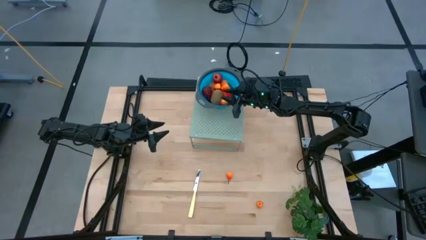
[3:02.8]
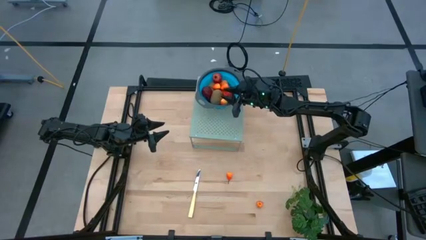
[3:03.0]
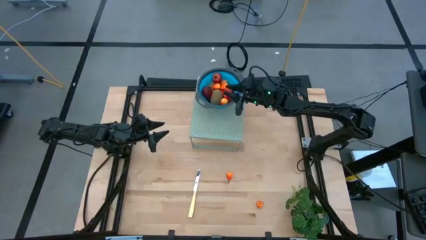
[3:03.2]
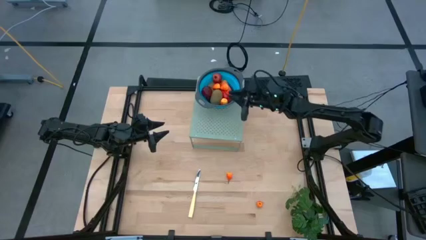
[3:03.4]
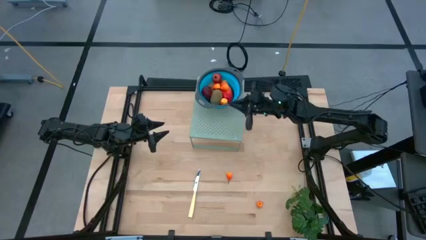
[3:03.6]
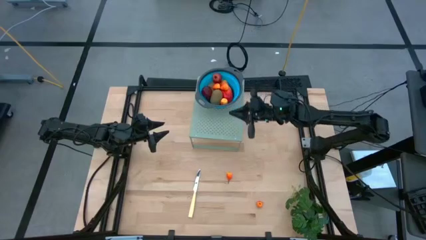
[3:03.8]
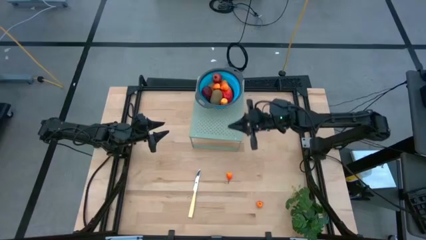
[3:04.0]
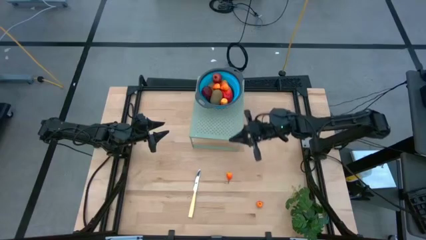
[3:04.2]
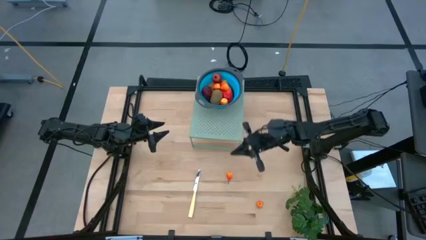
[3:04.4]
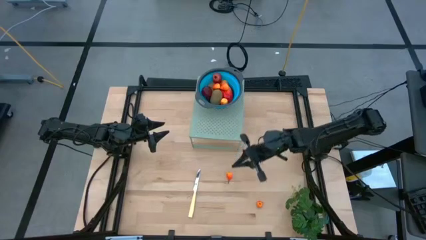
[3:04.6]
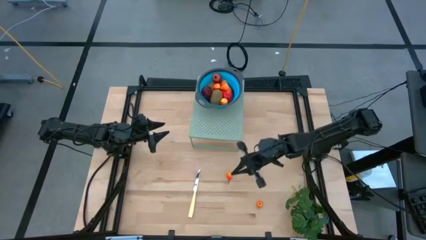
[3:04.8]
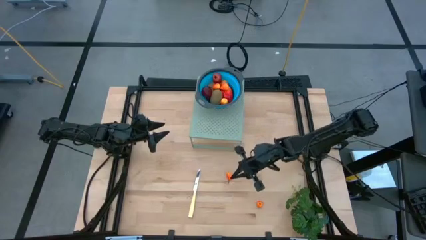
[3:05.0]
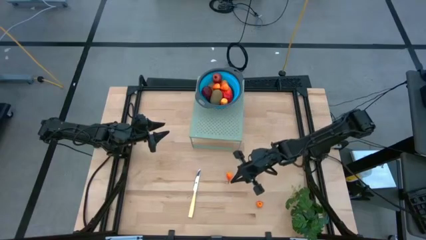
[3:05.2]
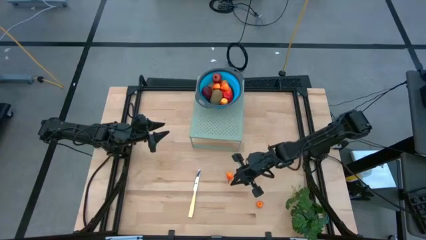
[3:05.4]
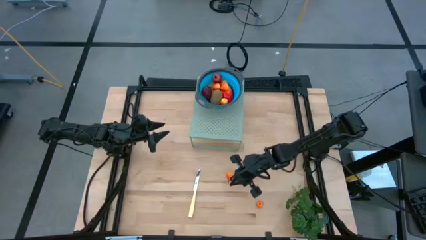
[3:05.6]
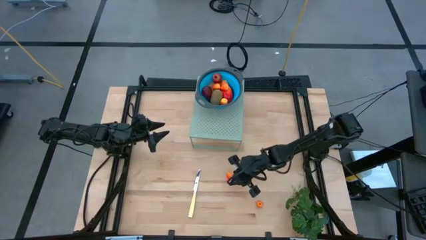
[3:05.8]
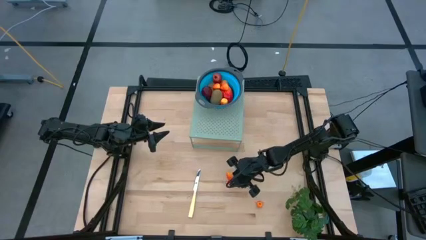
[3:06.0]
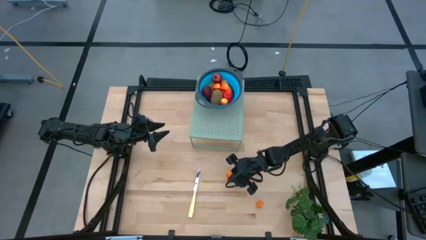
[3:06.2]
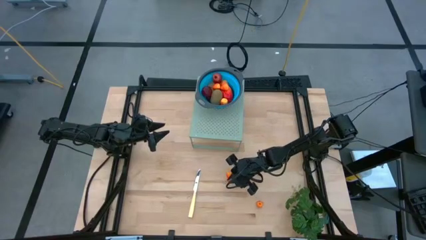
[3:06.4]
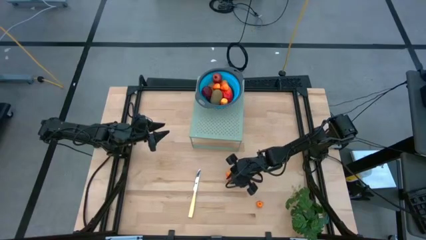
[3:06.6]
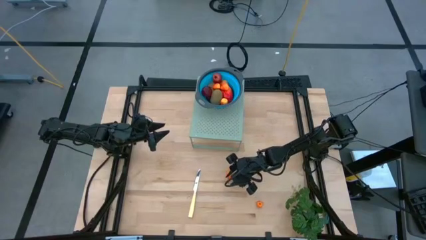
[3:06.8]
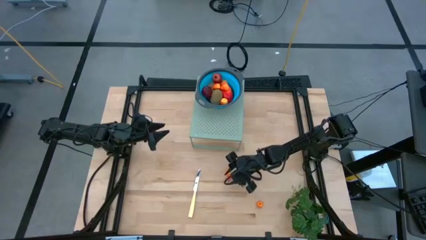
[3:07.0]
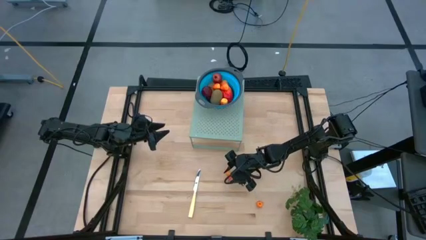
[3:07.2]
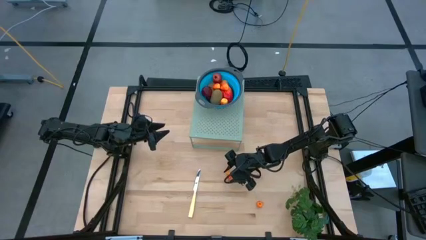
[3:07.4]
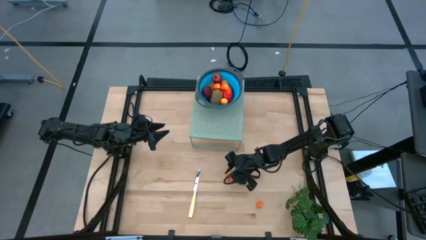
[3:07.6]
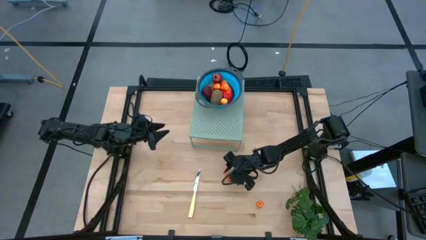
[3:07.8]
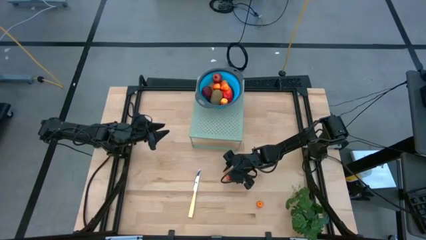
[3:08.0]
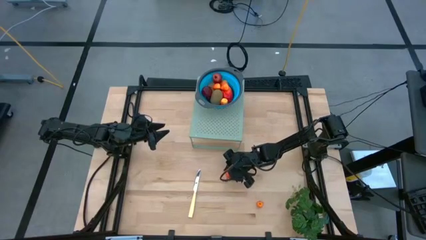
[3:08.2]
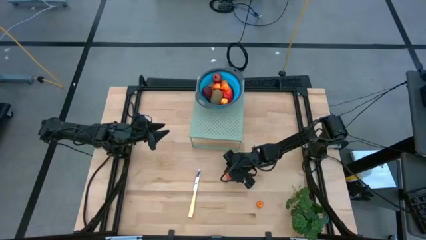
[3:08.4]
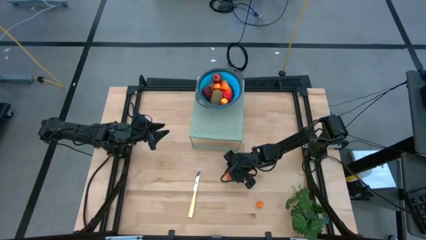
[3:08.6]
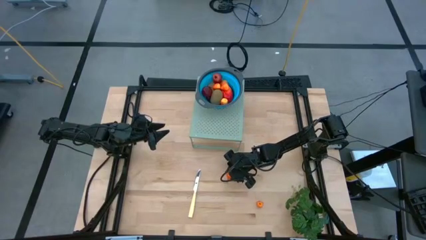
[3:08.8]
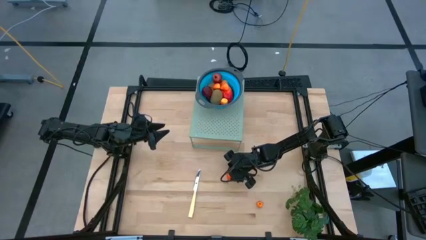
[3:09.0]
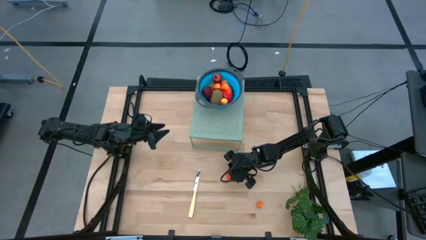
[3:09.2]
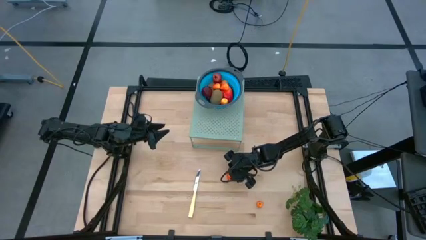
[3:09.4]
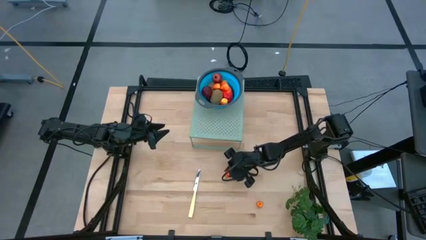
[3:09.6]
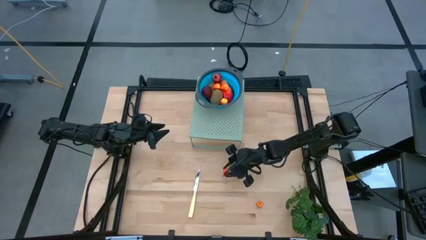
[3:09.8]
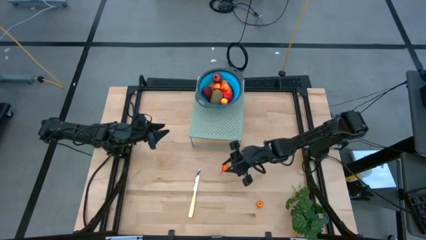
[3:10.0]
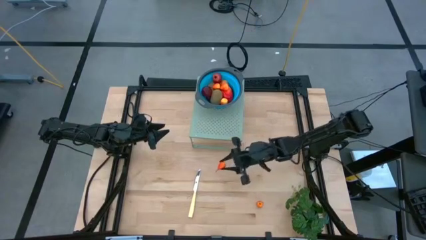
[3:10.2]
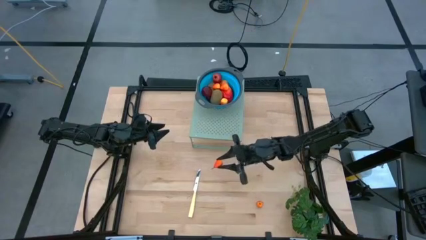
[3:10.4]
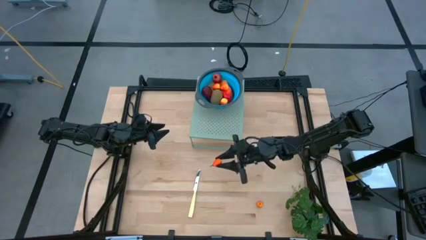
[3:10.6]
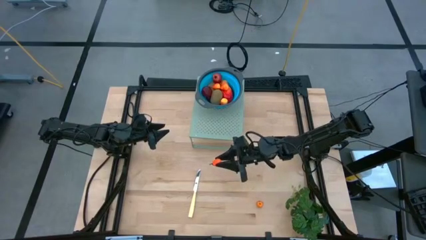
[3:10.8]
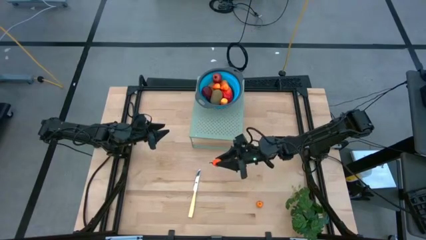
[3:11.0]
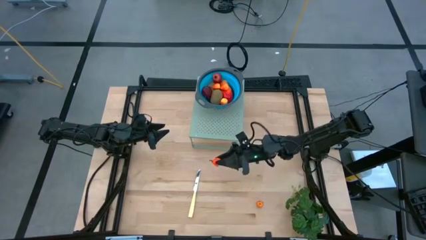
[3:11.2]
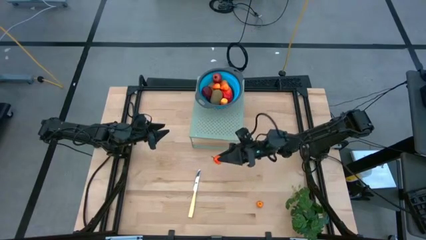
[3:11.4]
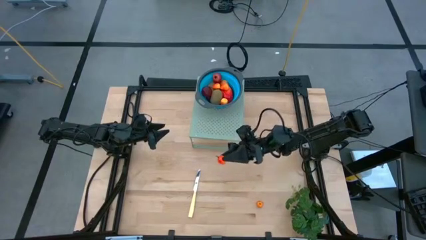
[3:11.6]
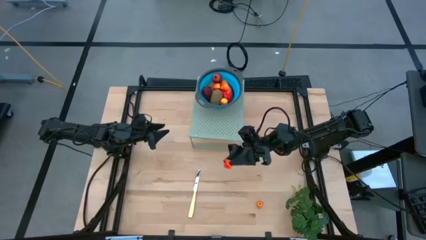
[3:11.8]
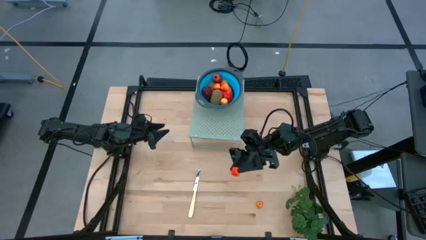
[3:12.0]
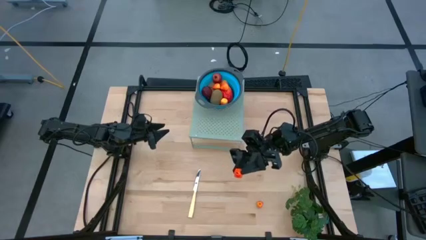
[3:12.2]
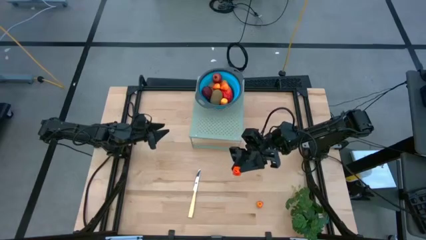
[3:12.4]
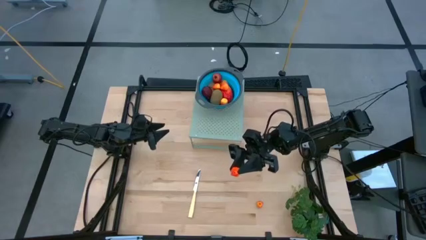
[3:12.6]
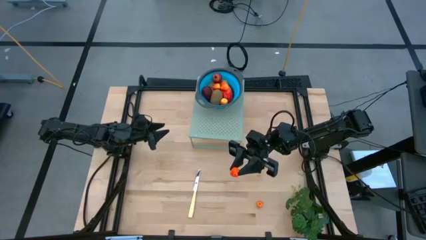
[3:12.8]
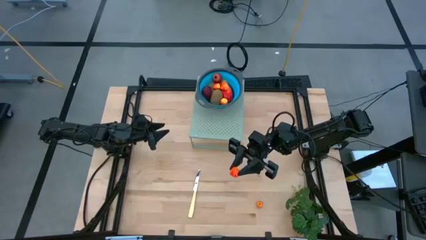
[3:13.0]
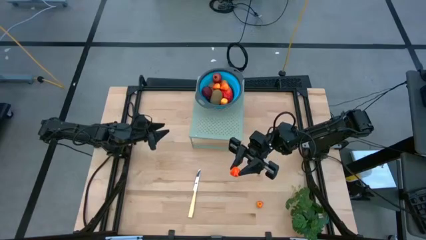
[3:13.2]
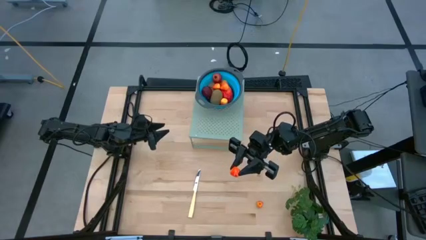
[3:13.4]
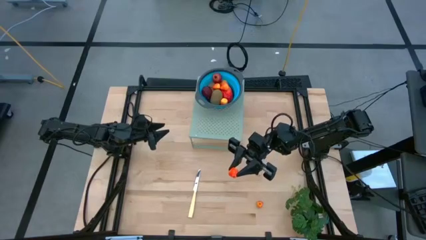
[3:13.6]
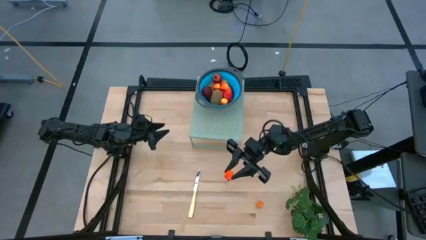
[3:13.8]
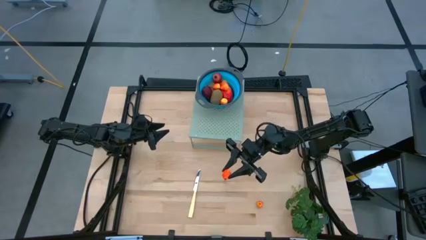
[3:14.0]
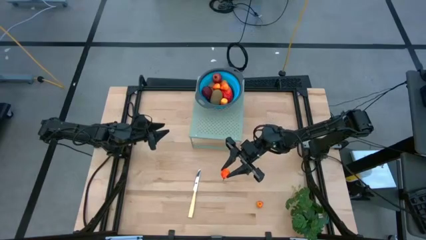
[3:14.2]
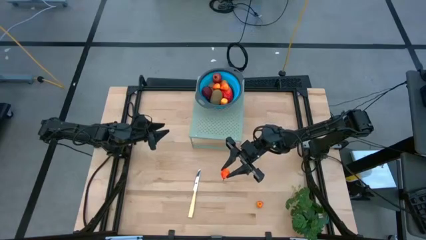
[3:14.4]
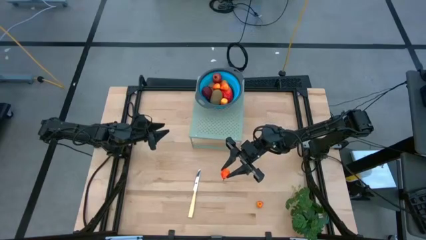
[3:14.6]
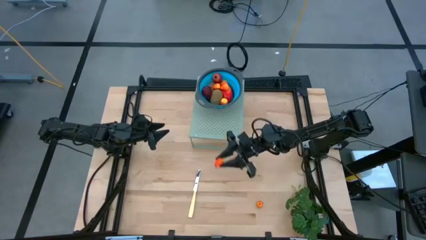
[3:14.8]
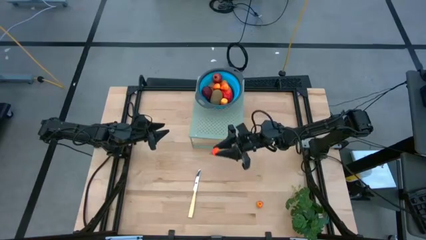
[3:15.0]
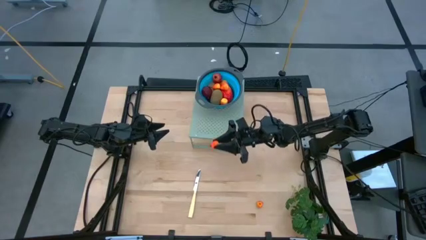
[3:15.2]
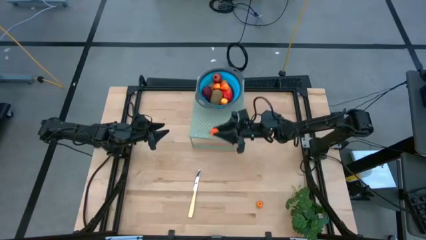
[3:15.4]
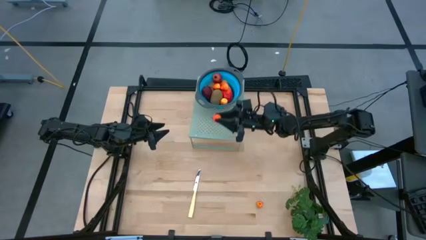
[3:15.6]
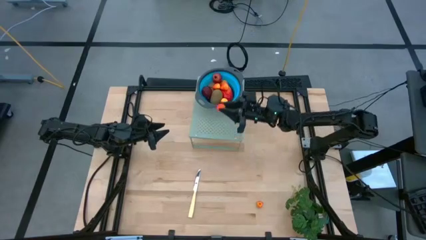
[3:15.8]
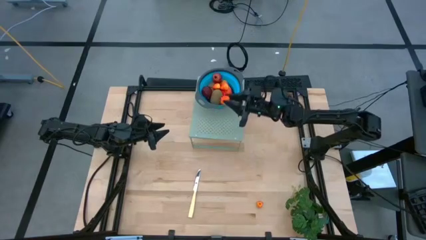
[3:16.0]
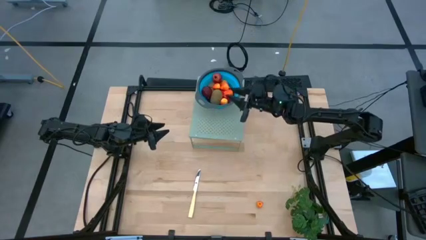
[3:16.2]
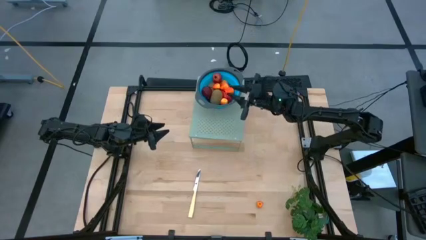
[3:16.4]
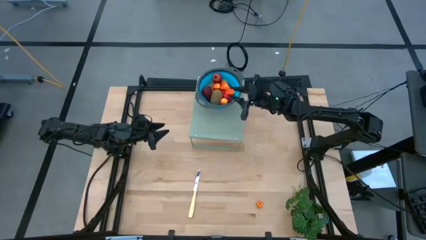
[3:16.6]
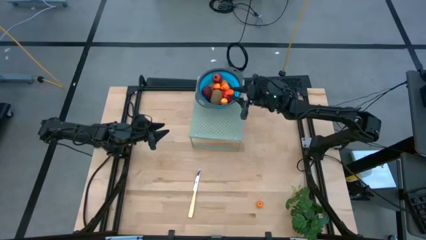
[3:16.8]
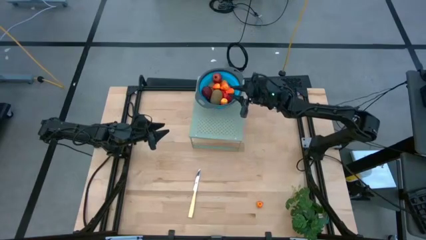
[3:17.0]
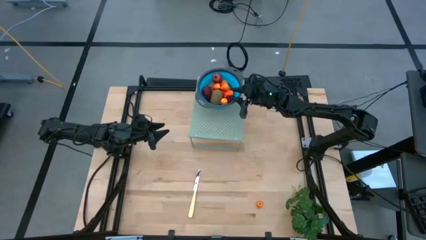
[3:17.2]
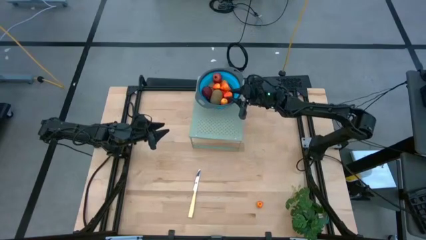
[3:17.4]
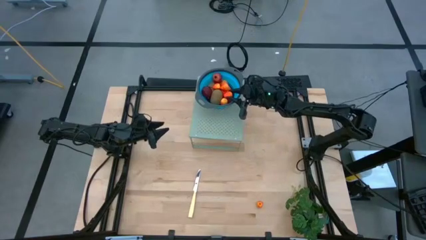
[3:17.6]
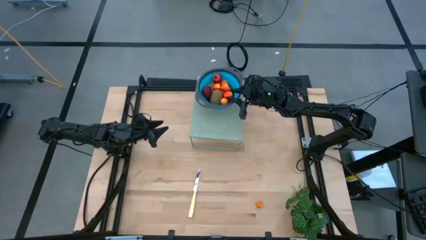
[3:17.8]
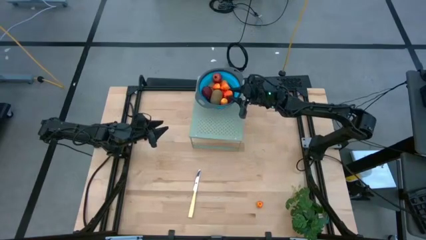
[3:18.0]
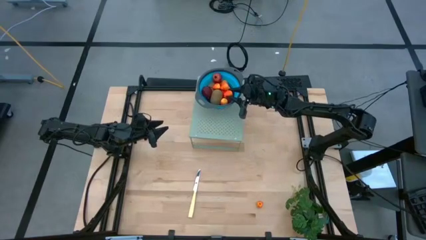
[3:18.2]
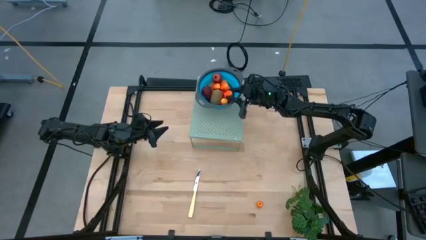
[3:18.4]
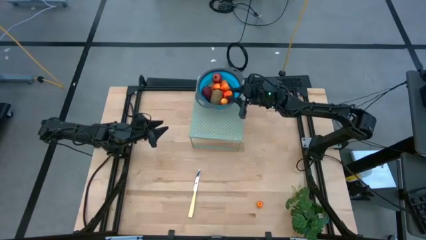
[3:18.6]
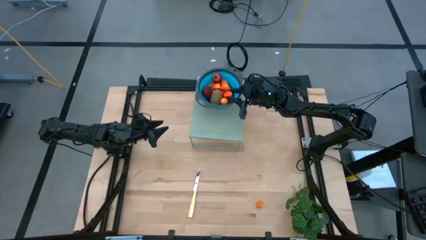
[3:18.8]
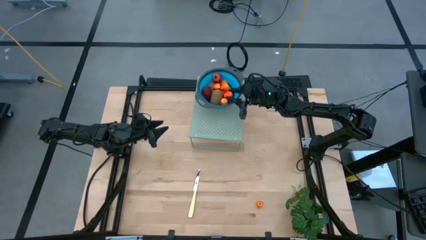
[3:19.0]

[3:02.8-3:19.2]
Task: Pick & Place Fruit
Put the peach into the blue strainer bowl on the shelf
